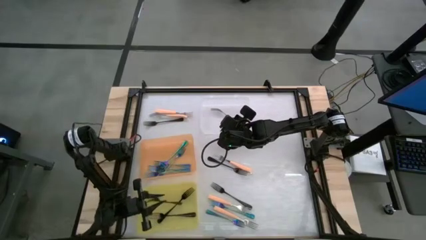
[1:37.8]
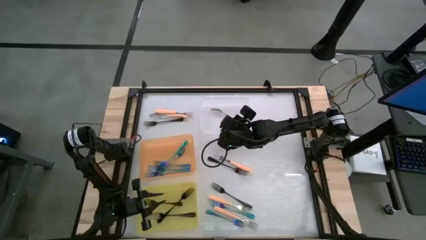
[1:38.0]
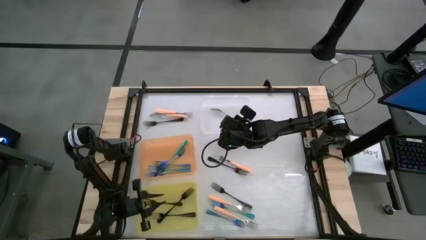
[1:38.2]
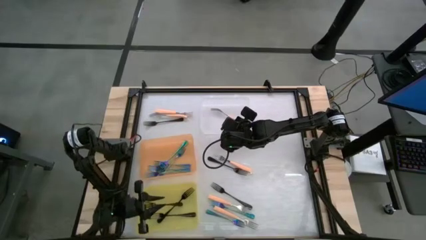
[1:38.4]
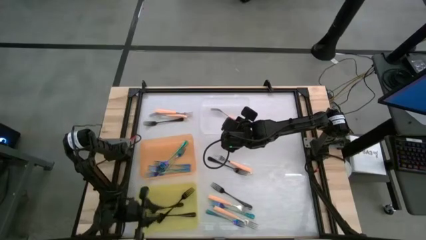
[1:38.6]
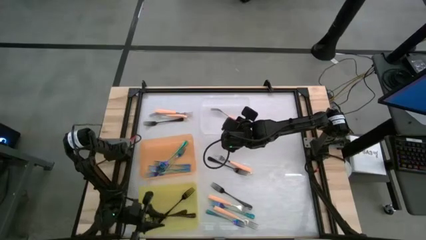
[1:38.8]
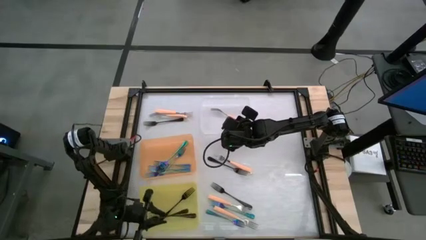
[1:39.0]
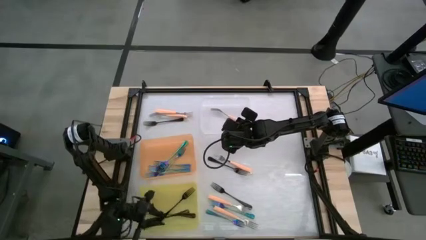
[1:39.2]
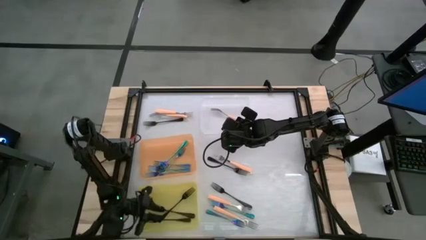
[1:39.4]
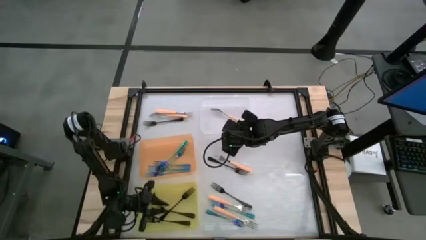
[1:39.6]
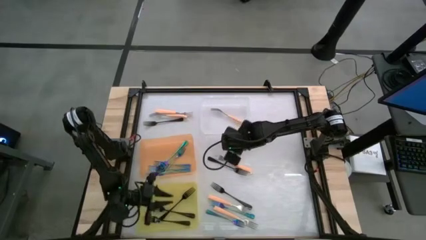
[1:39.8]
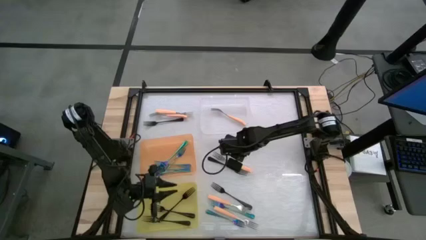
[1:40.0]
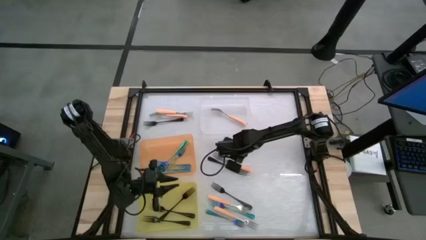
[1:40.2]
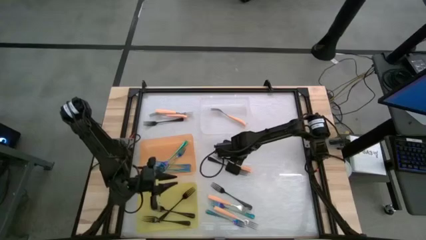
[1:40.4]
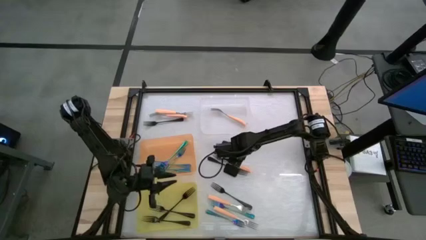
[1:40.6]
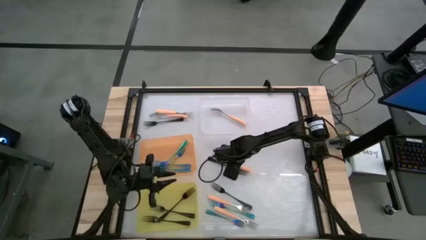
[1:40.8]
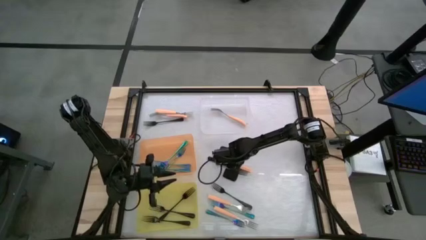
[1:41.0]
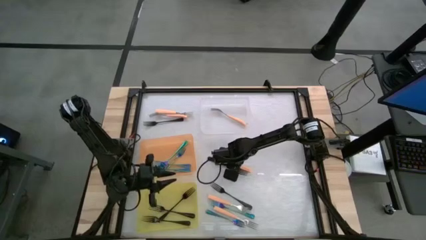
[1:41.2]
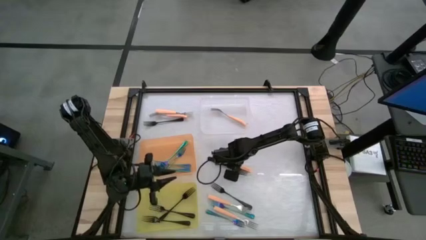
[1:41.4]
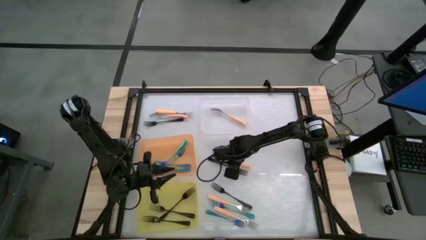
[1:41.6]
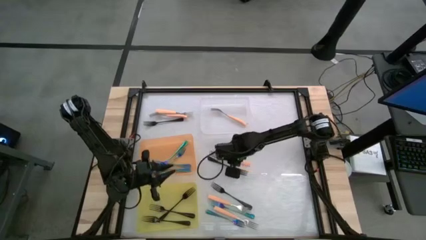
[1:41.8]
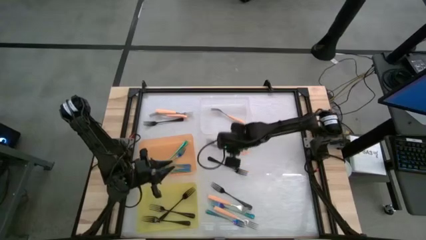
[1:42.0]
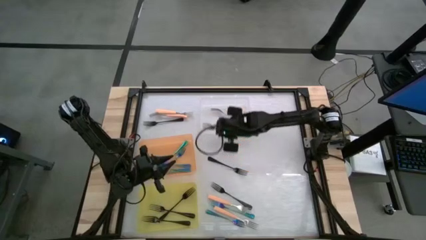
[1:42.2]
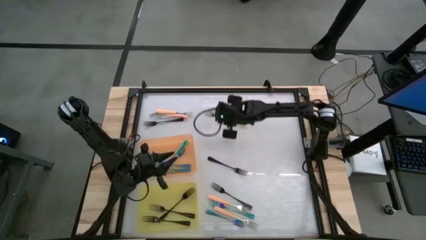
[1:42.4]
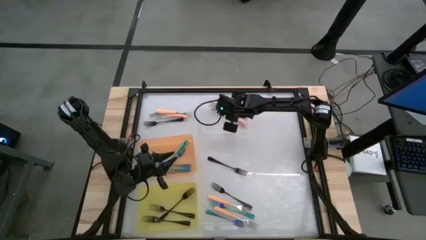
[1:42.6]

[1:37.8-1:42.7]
Task: Sort silverware by color (type)
Put the orange fork into the transparent bin

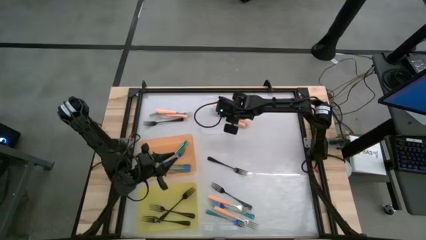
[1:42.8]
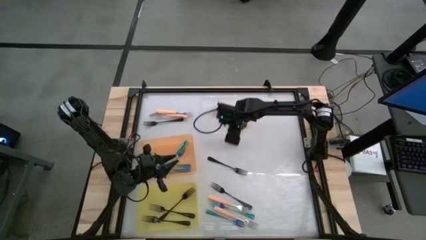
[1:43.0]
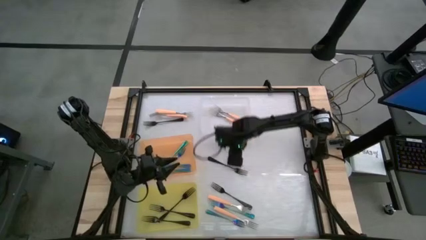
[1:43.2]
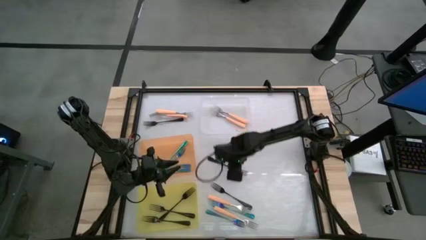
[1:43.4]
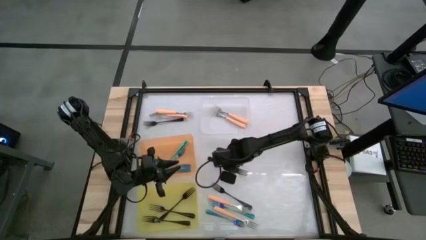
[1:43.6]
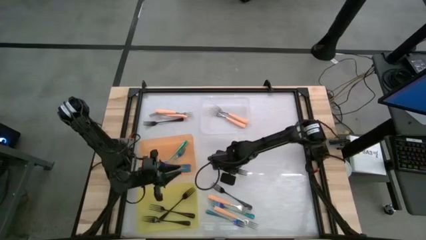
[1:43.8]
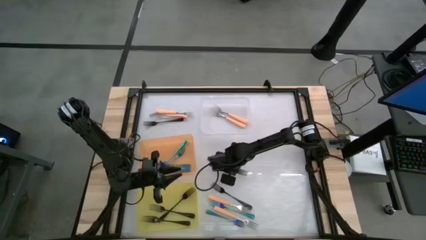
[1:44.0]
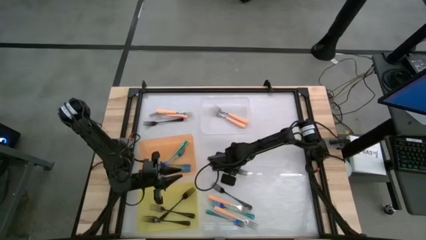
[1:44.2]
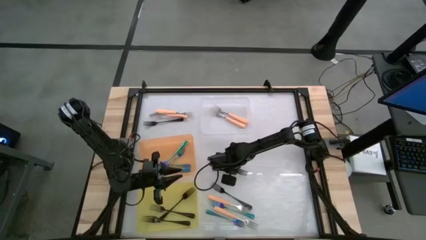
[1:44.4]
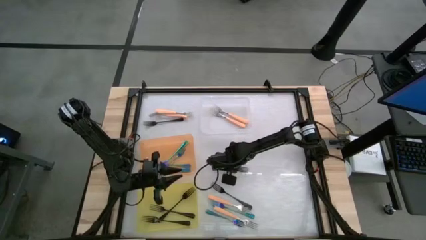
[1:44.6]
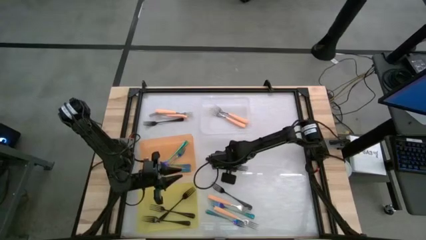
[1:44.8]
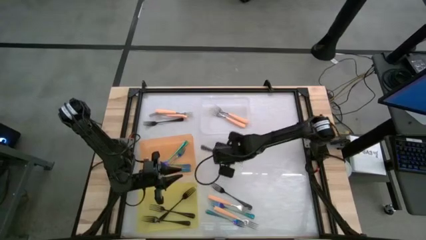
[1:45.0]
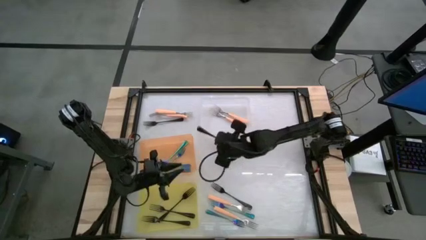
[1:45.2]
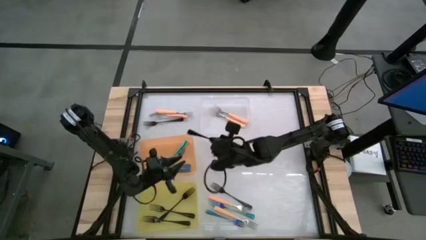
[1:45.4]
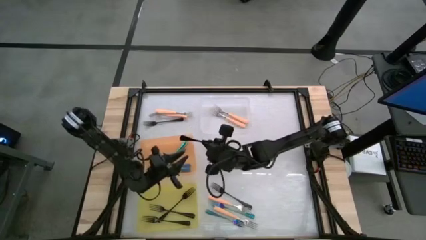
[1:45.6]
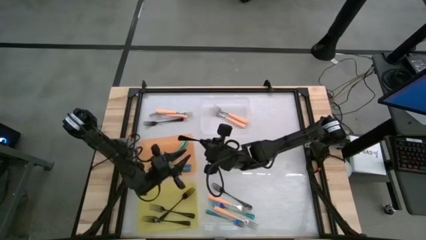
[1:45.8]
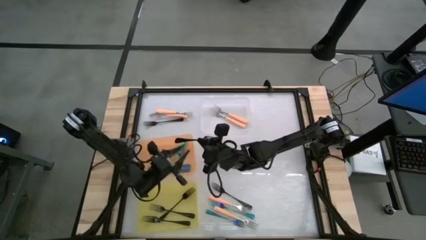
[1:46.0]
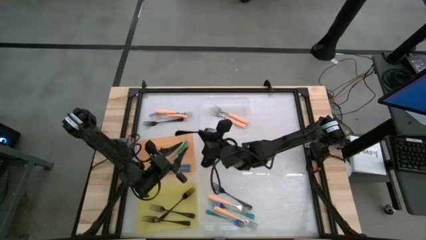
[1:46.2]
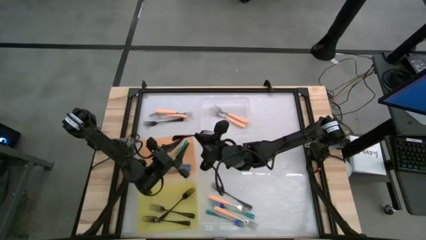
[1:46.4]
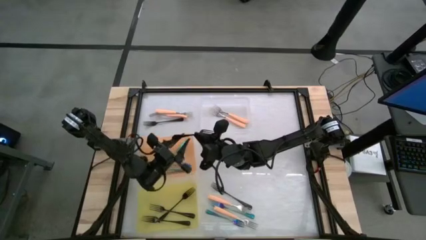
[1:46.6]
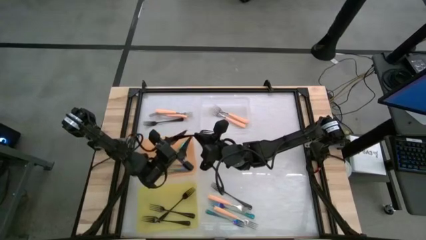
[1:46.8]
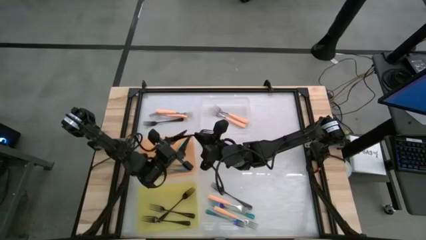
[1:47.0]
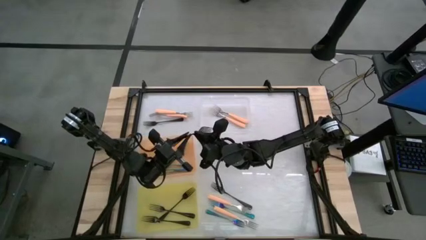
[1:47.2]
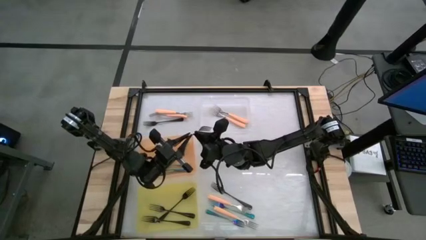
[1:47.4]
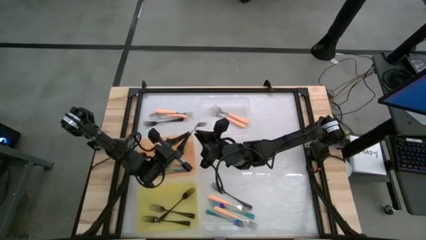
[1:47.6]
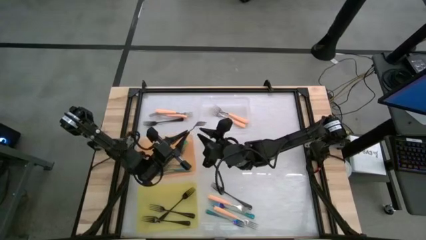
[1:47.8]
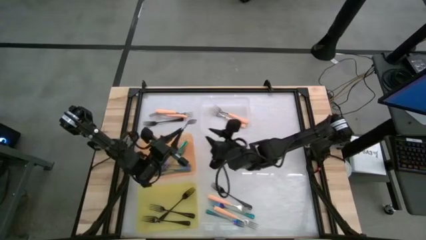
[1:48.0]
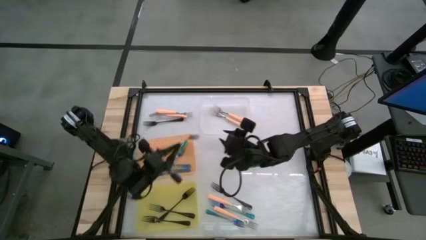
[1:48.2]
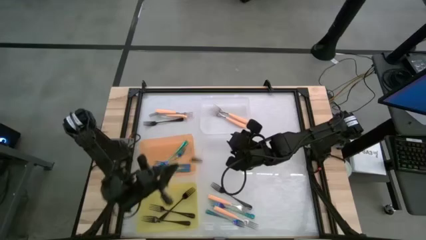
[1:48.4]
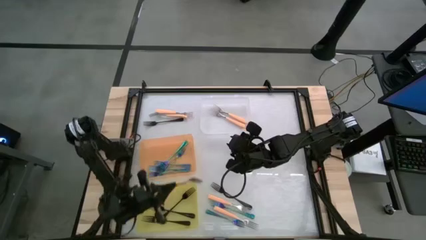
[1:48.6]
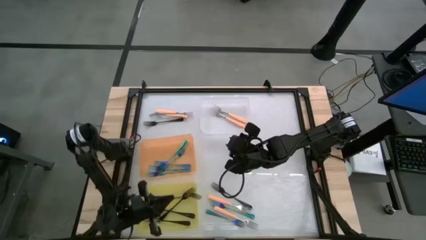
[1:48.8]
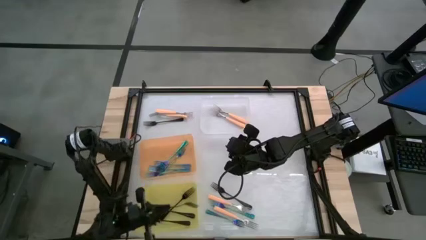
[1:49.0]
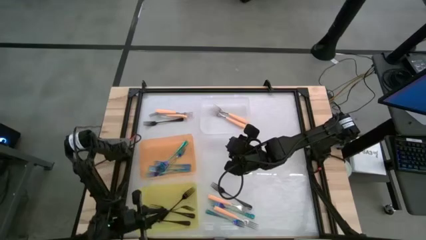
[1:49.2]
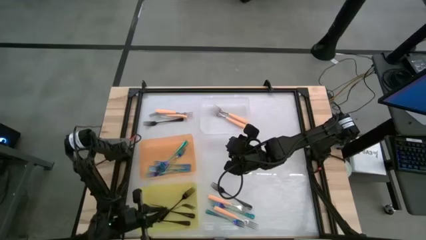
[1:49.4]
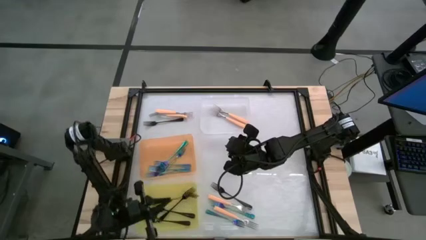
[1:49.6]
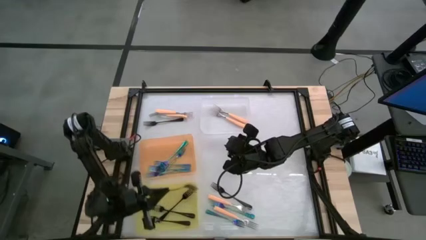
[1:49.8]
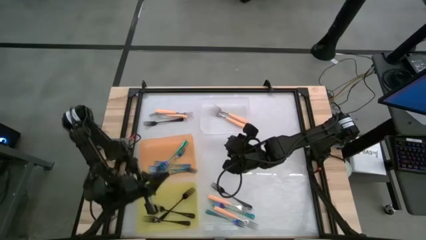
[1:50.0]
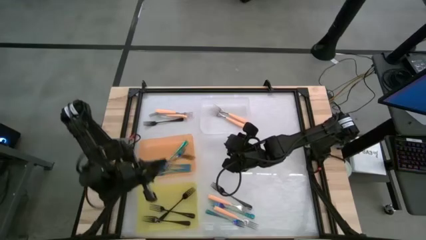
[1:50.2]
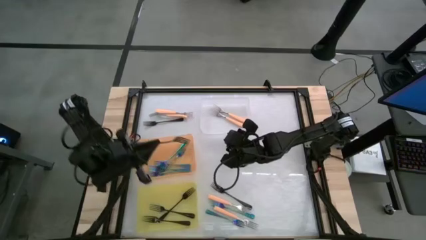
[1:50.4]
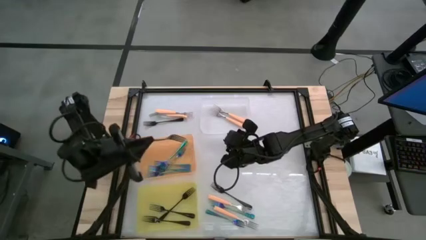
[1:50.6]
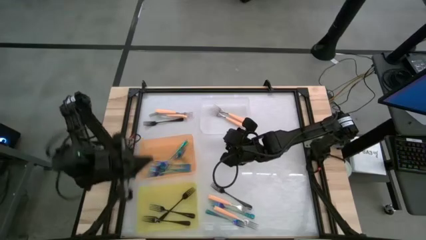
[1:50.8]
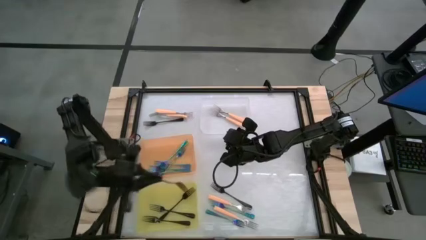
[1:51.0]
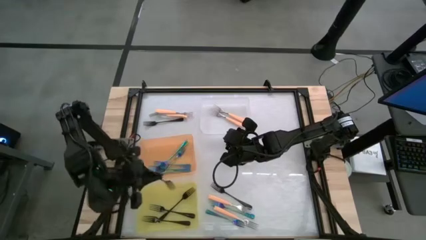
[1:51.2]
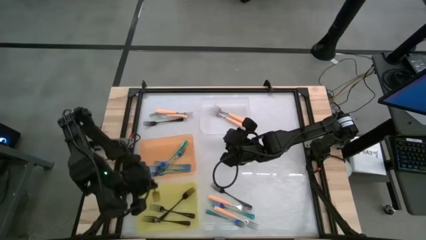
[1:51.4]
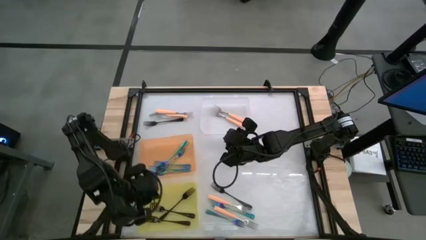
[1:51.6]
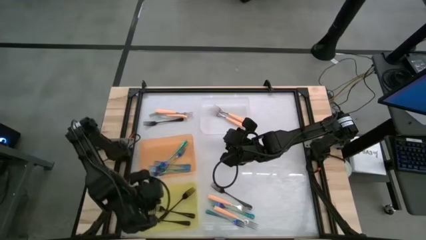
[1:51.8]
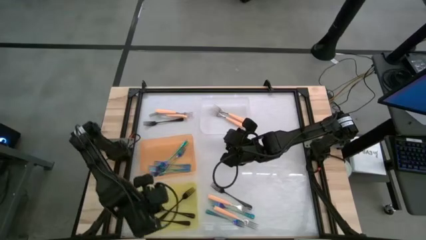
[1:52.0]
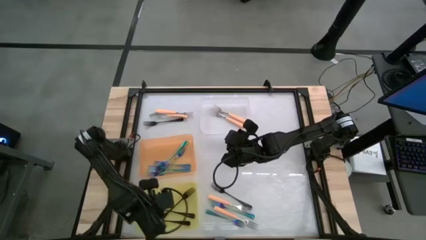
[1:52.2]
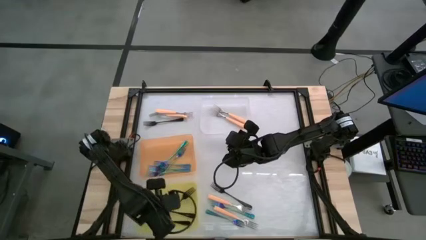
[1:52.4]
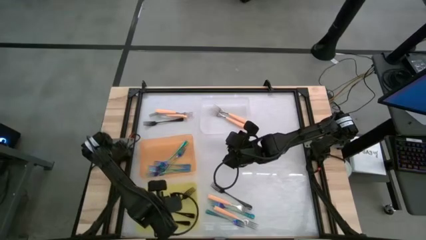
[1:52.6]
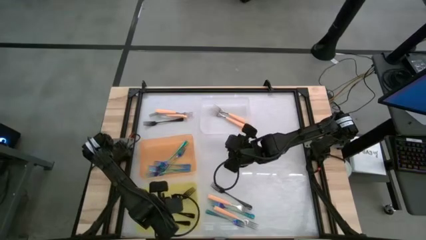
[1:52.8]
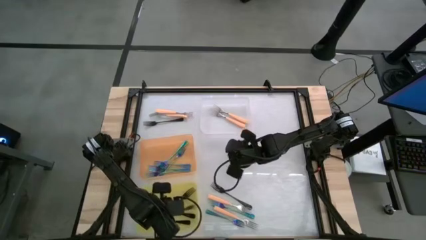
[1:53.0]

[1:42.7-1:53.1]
Put the black fork into the yellow bin
